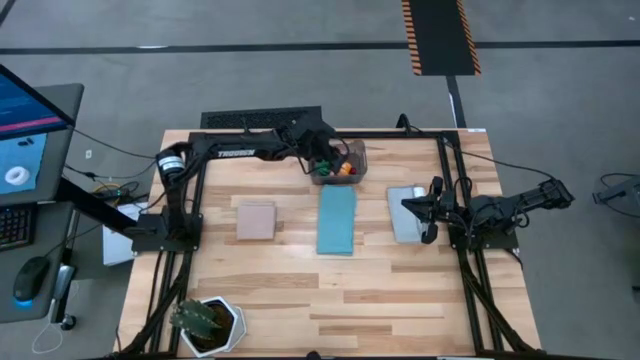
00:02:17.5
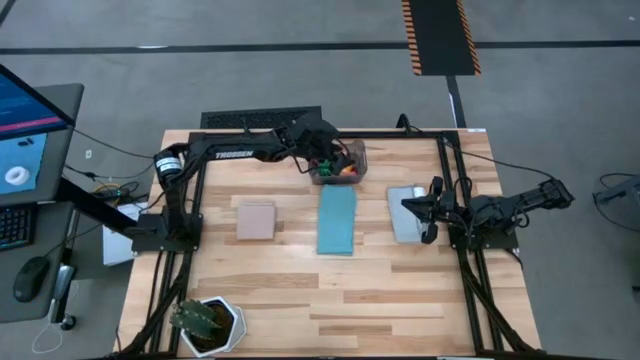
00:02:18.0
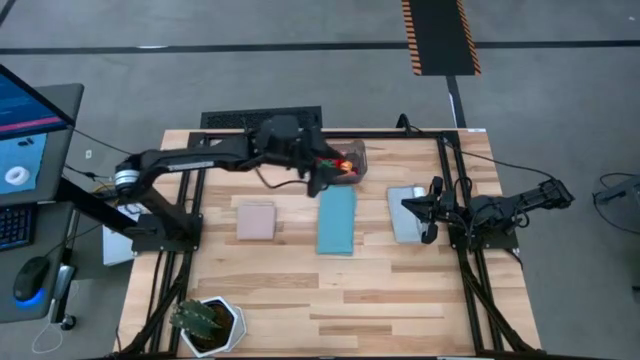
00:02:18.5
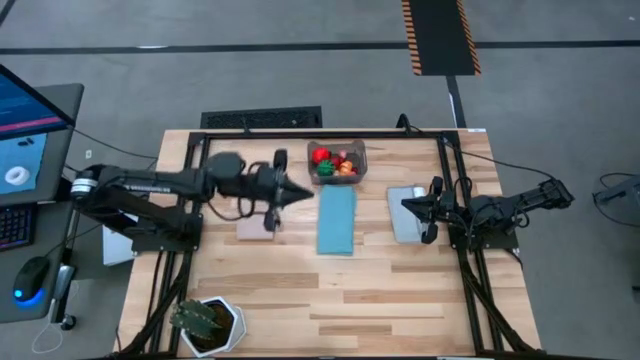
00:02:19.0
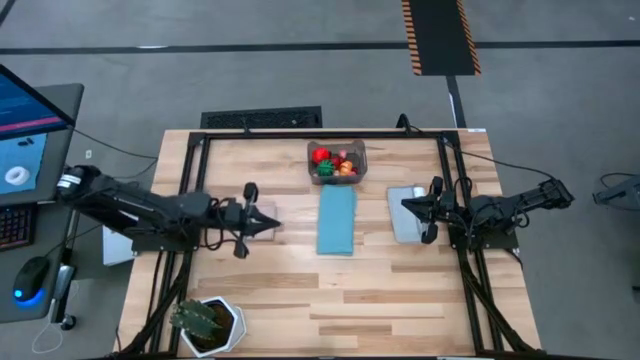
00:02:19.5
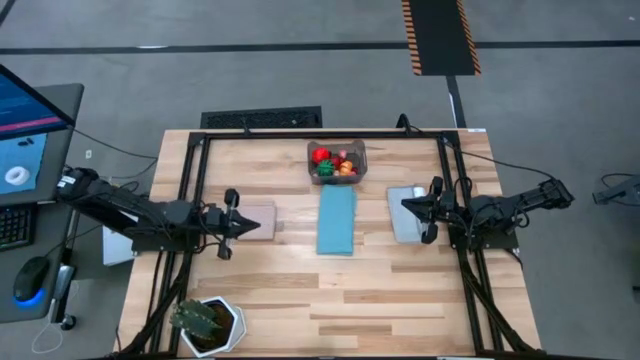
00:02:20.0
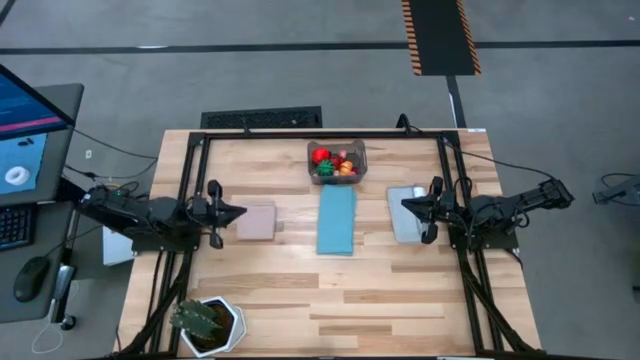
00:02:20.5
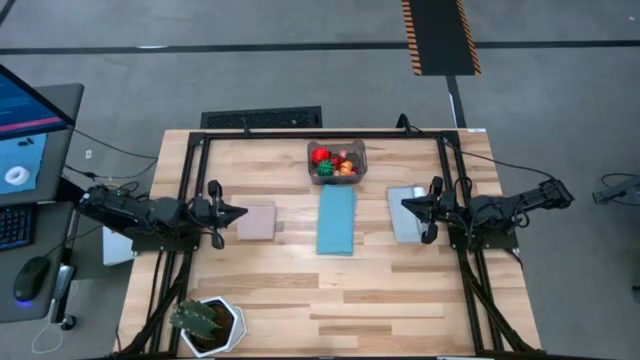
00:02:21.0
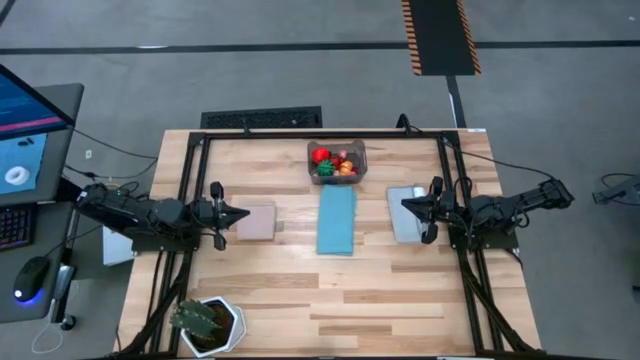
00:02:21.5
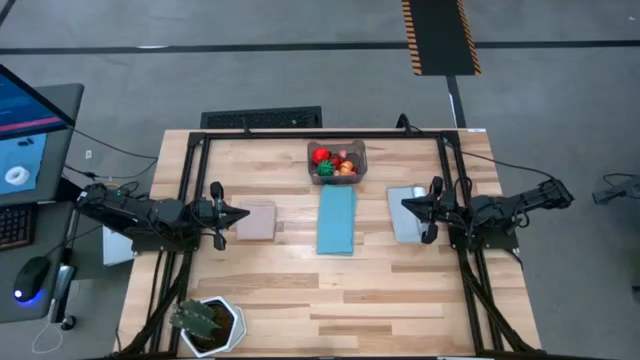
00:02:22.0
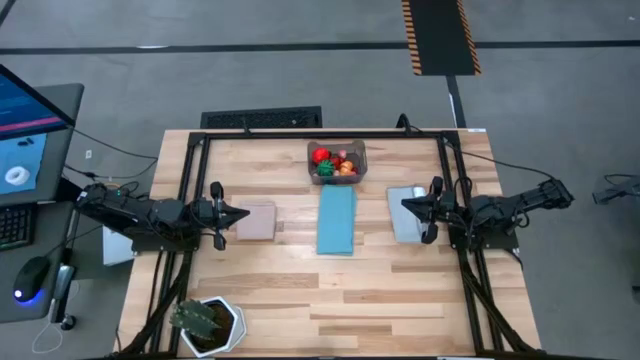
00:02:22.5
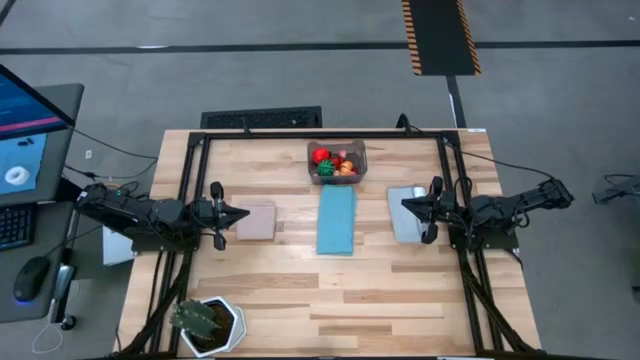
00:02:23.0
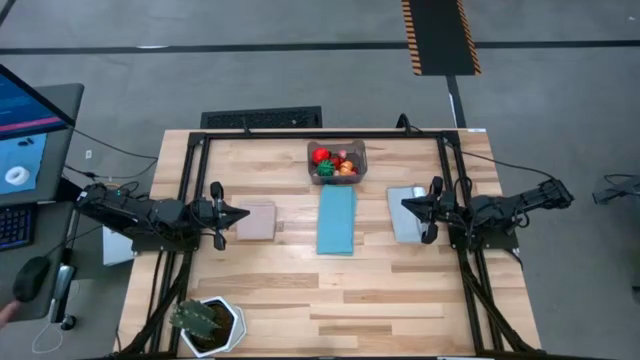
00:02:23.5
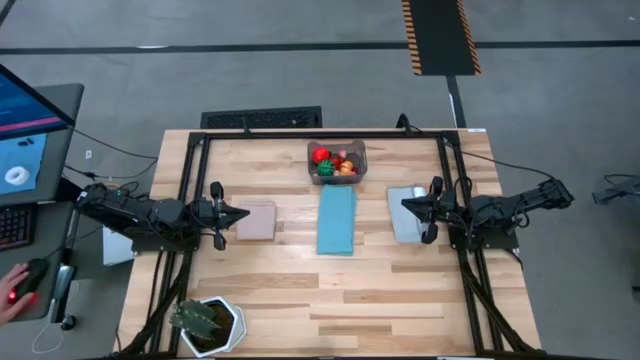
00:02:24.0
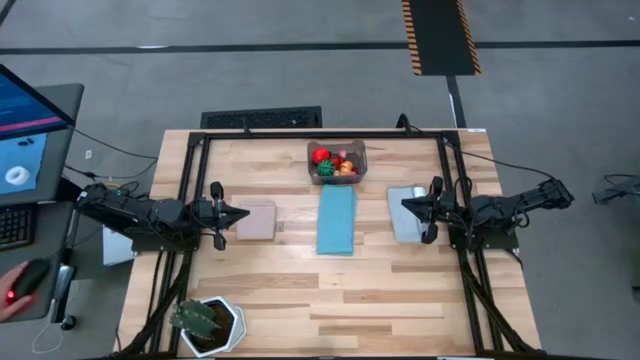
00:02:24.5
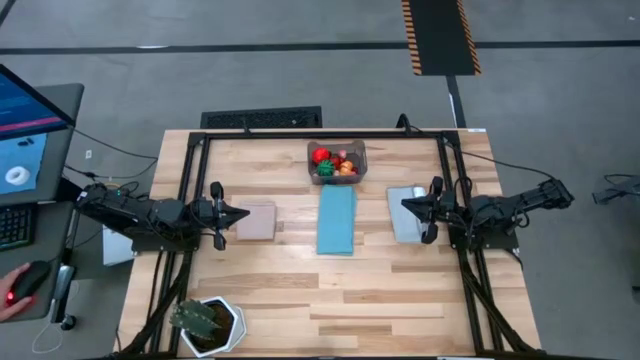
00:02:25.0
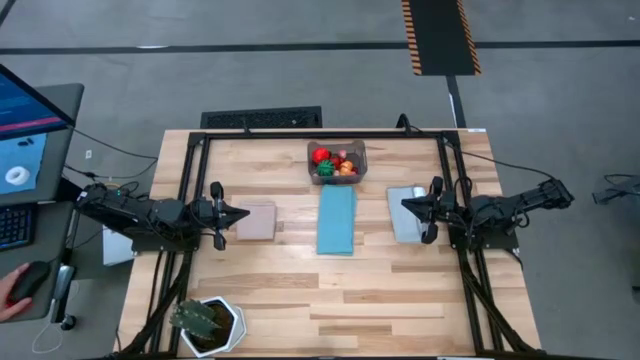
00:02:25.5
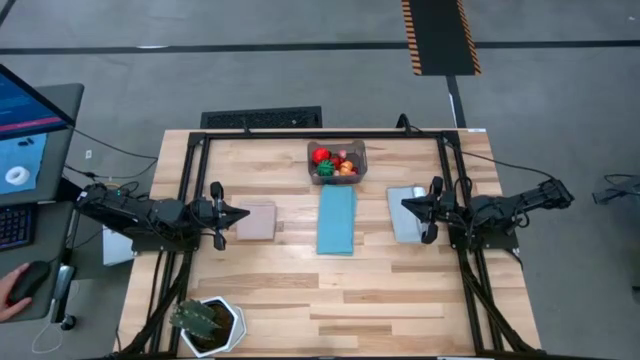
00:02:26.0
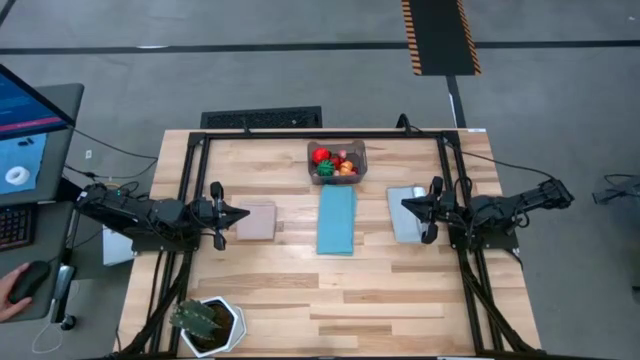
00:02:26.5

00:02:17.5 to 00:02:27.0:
Task: Pick and placing Produce into tupperware
Return to Home Position

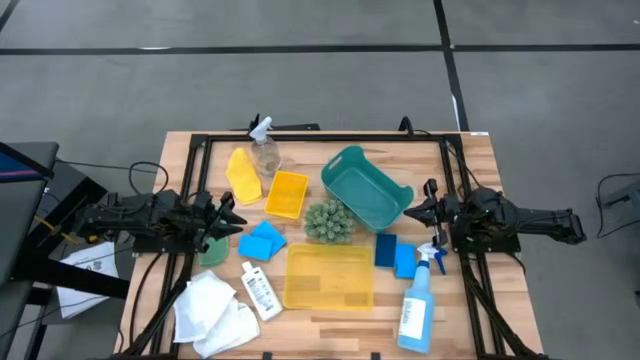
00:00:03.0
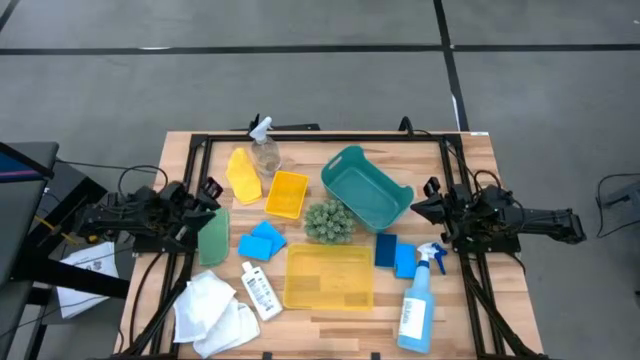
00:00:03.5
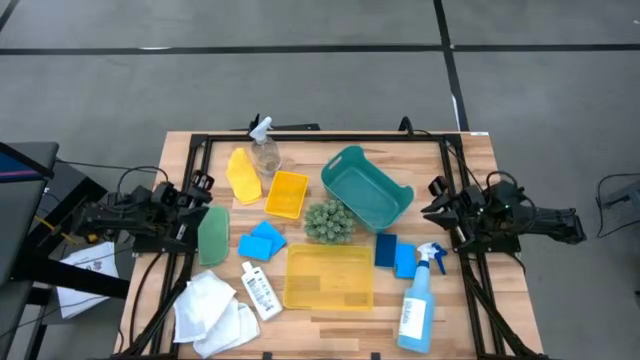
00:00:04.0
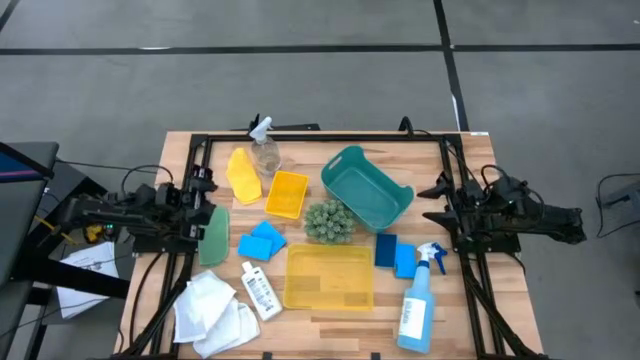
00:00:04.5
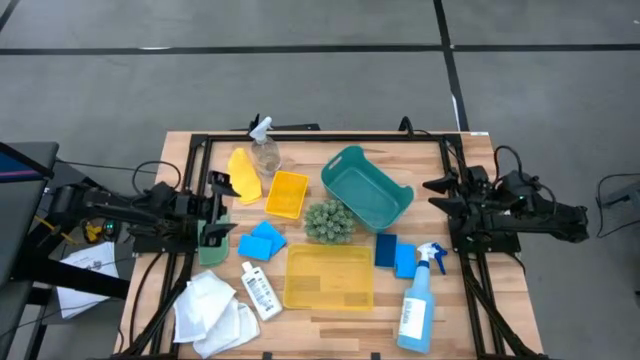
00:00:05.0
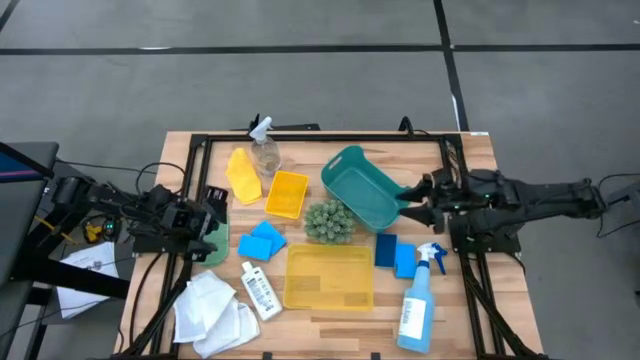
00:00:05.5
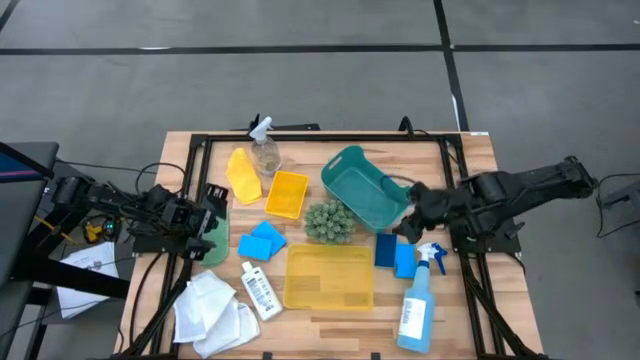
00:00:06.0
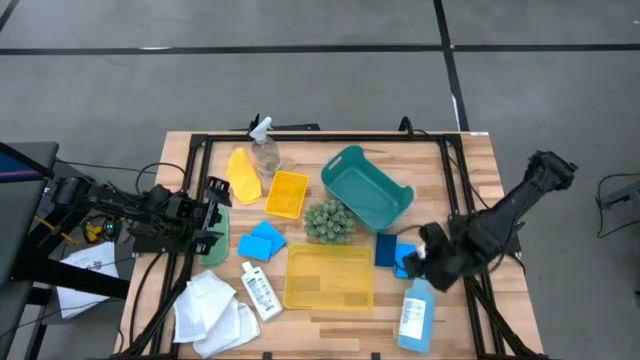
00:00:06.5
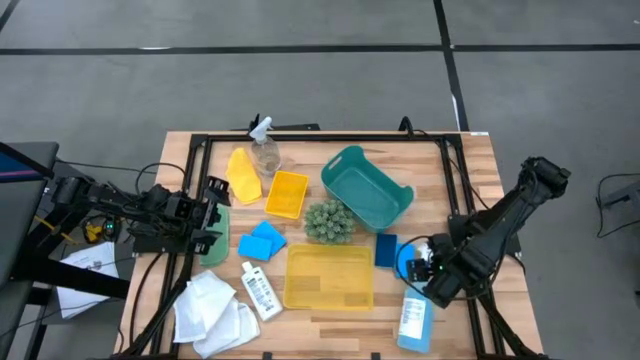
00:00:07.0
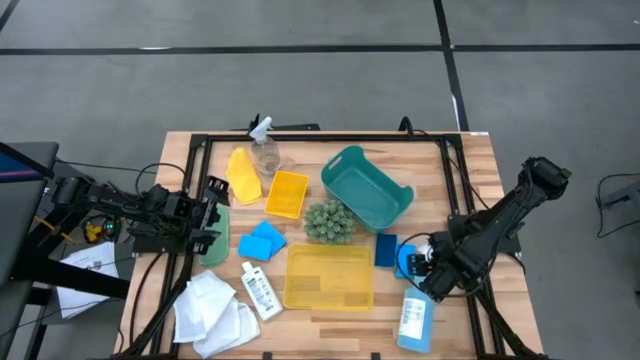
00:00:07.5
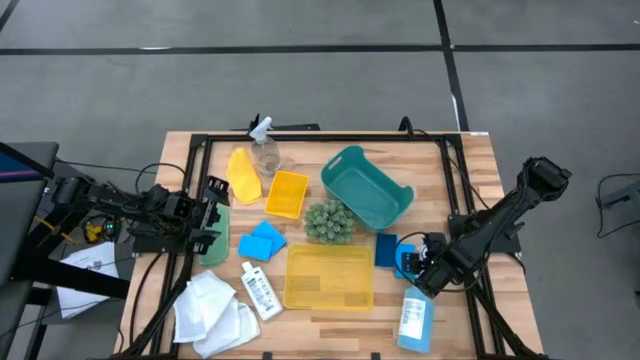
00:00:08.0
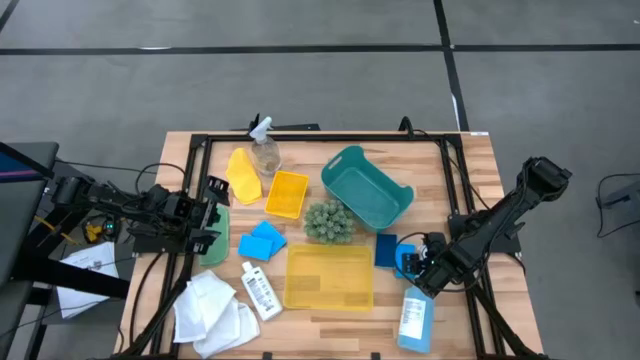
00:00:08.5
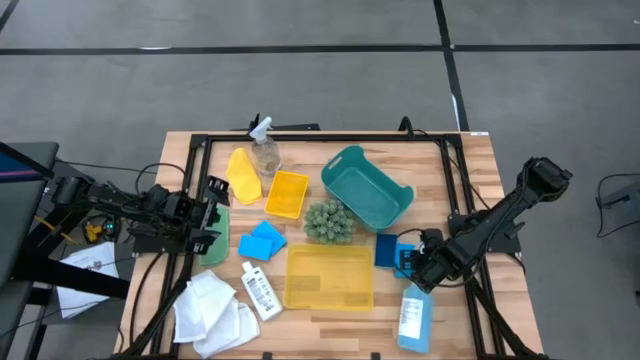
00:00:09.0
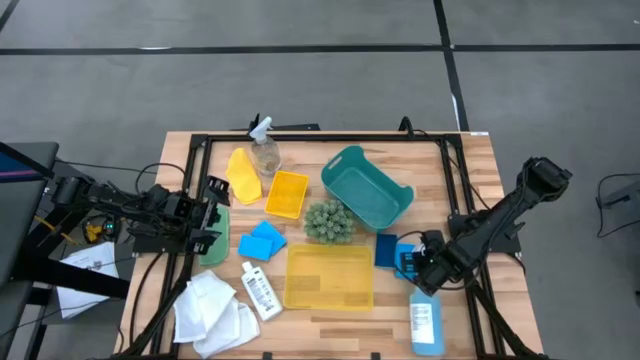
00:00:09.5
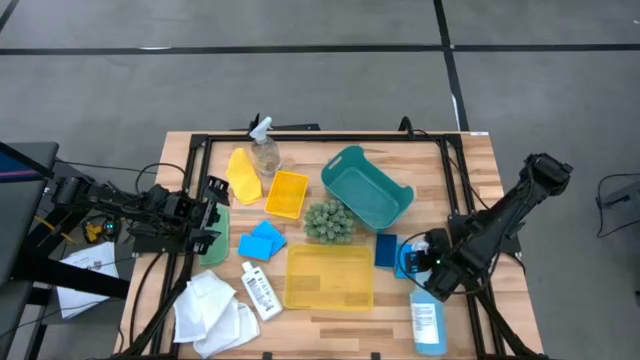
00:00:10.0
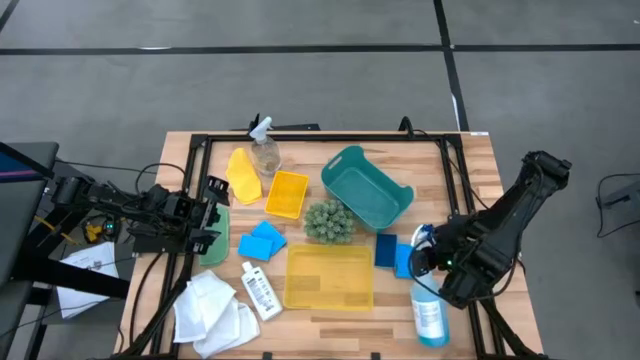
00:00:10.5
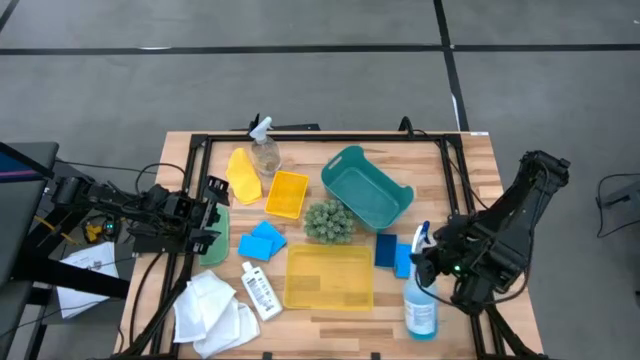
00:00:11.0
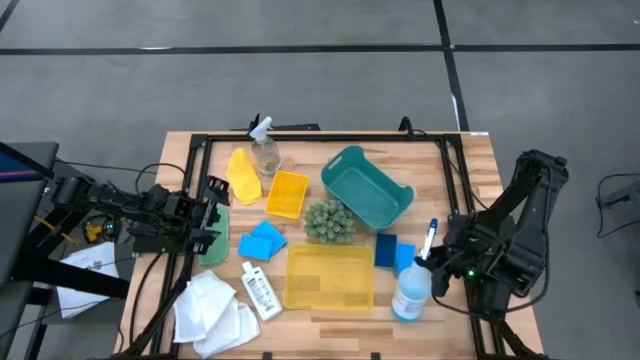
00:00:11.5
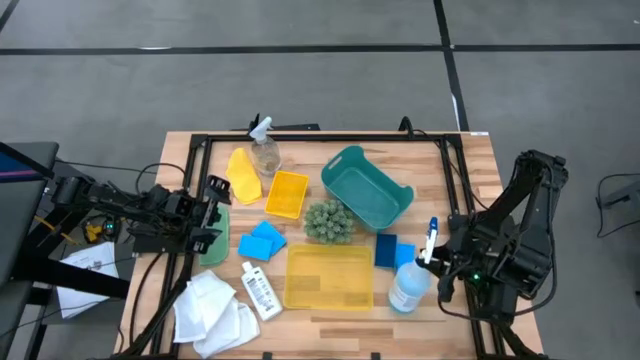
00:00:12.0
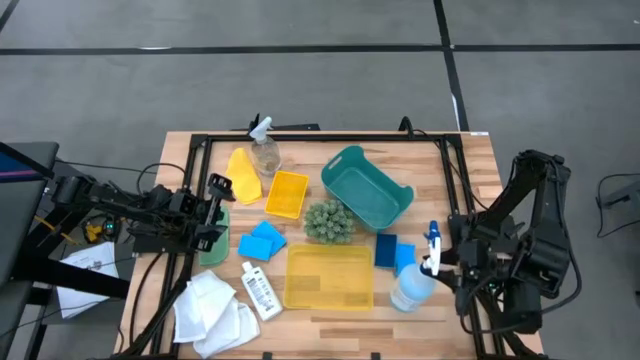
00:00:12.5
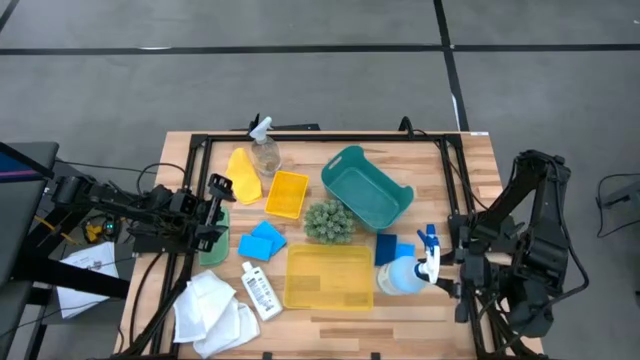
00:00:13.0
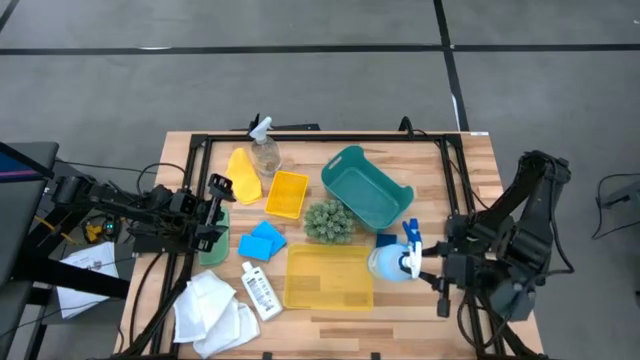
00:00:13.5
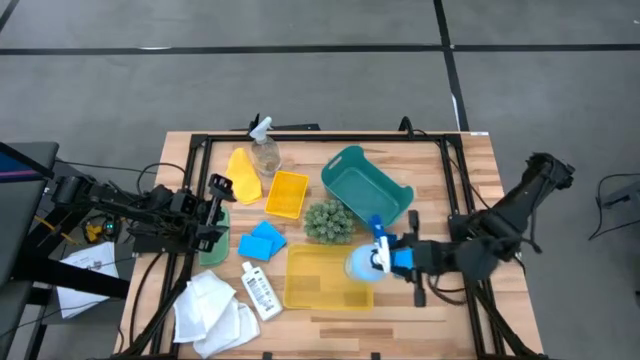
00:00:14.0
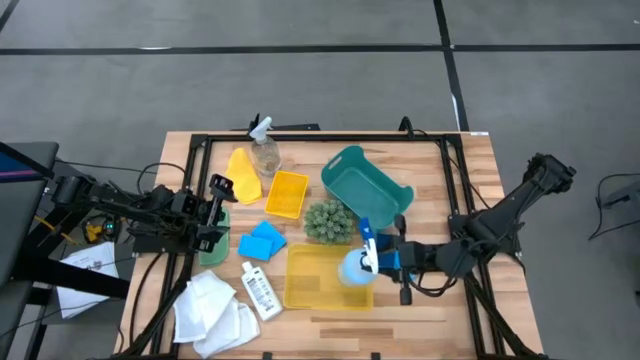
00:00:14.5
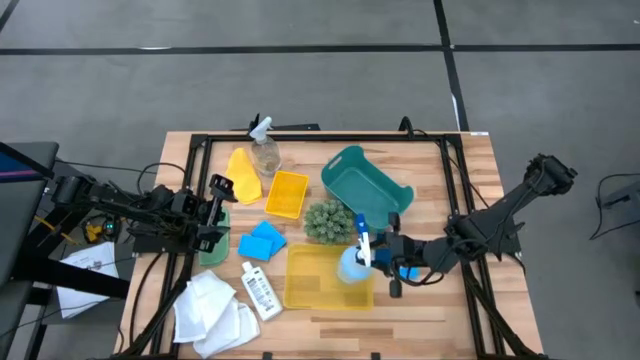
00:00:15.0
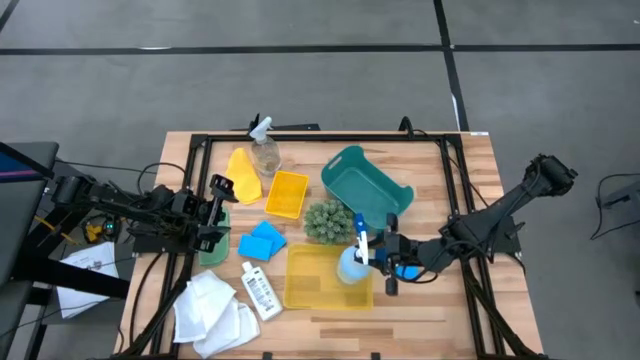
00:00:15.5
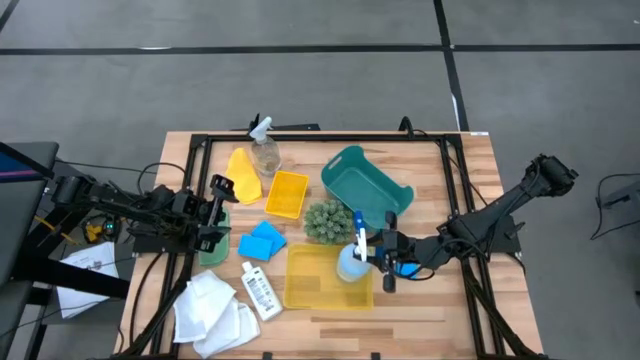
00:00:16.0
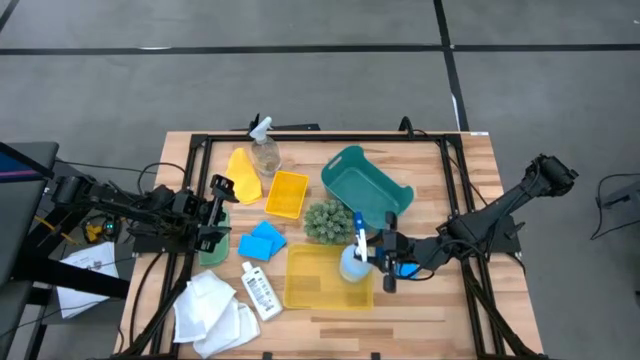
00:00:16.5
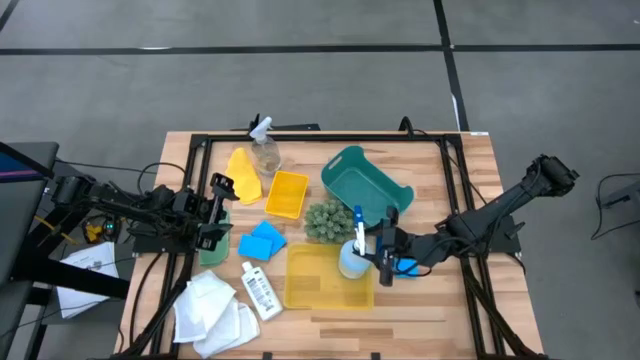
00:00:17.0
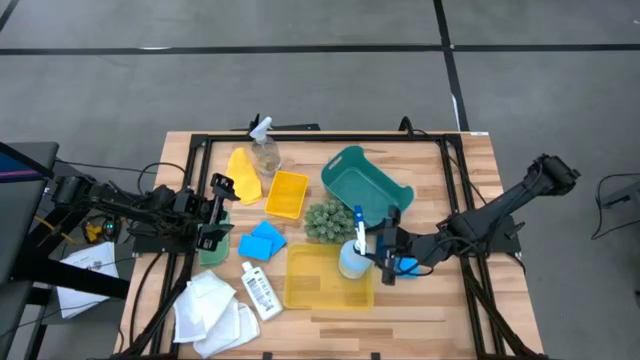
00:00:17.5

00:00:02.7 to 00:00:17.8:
Task: Pick & Place Kitchen Items
Put the white spray bottle into the bottom yellow bin
